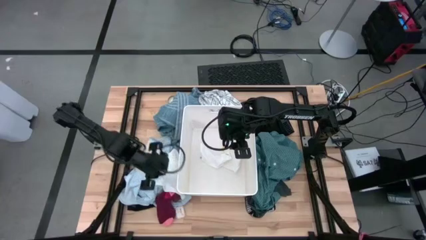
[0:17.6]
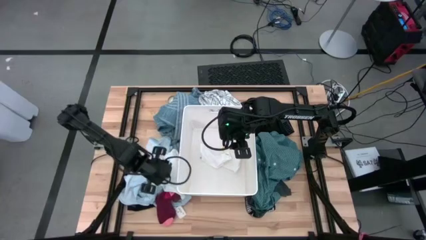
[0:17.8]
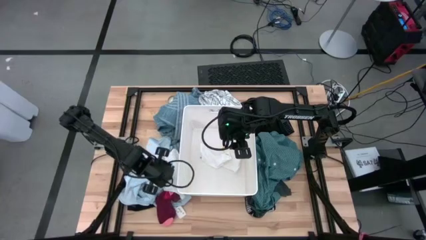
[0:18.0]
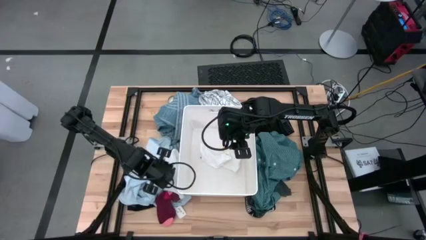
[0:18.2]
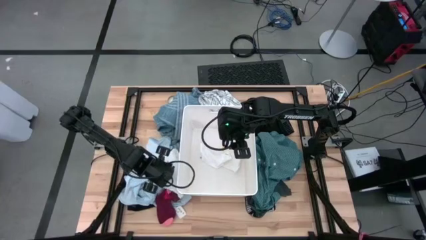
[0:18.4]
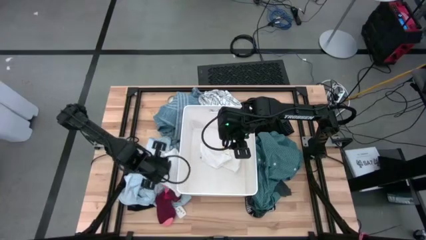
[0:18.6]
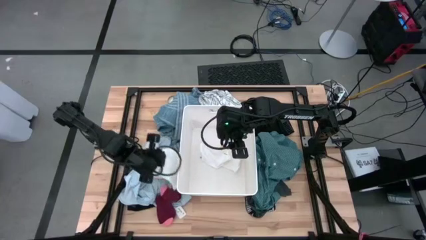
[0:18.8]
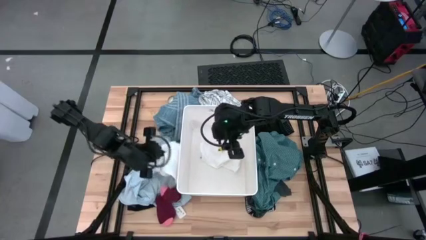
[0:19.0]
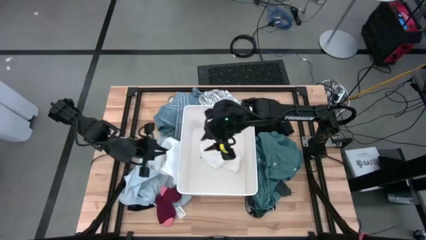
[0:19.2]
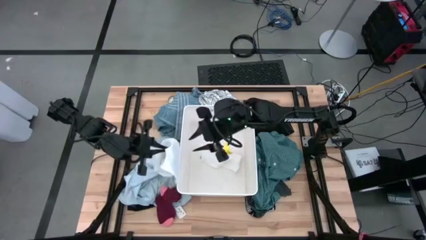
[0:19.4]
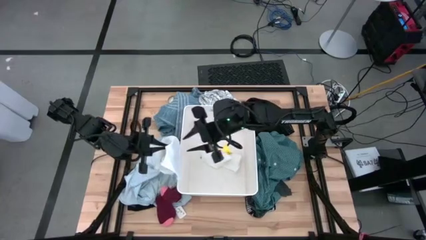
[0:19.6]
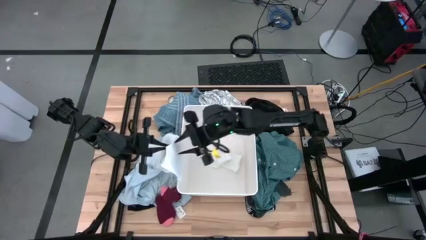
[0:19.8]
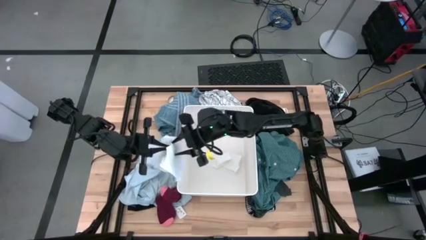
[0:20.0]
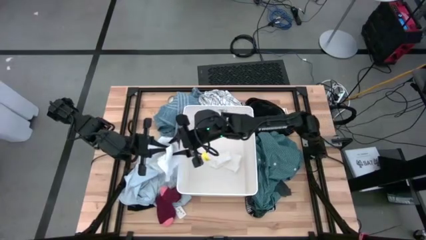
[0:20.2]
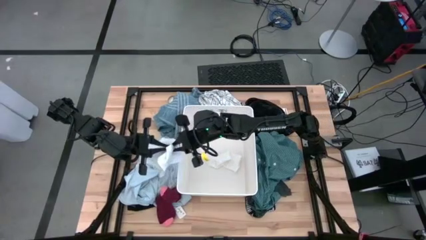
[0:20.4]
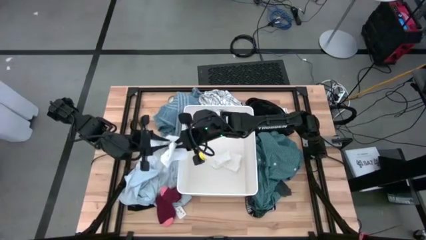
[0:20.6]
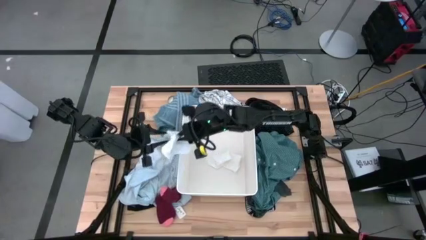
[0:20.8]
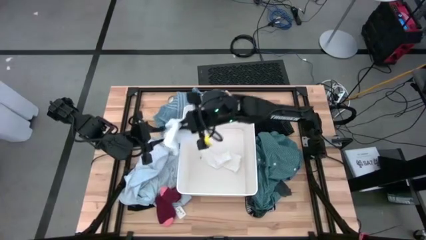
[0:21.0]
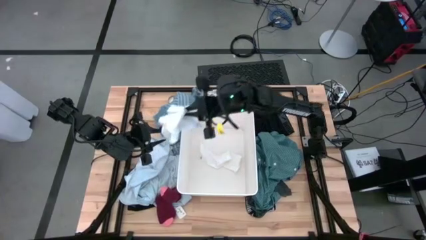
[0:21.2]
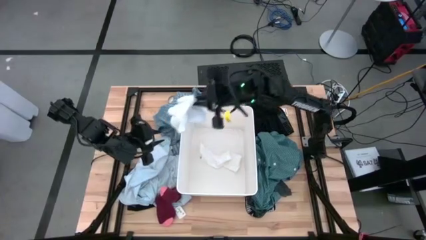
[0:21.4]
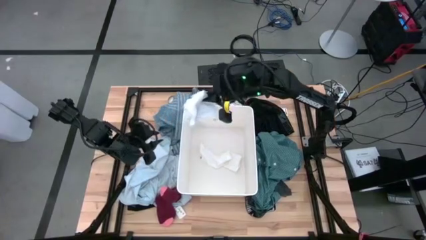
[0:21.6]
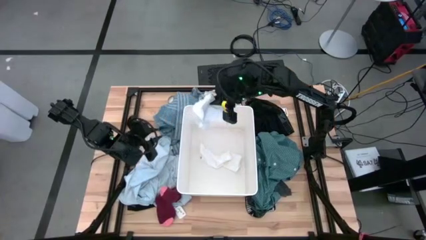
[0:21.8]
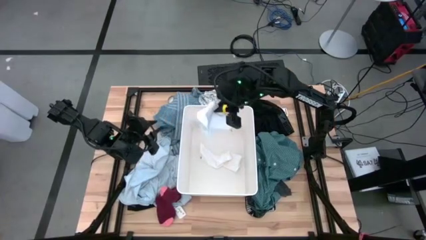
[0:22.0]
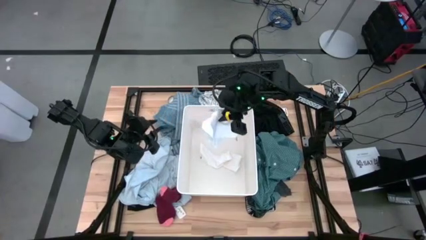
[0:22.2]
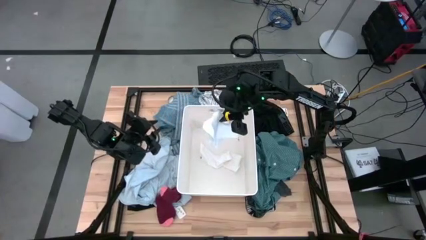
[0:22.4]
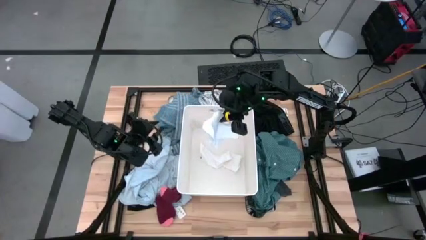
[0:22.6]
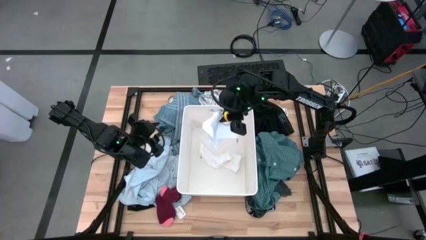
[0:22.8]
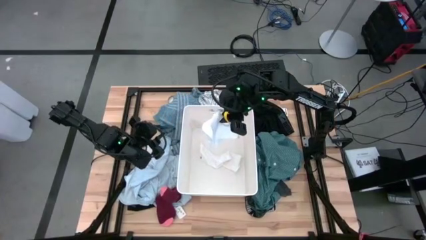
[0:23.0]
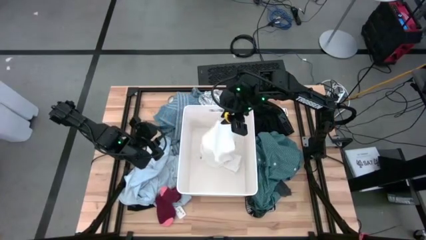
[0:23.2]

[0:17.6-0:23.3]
Task: Sort clothes
Put the white underwear into the white bin

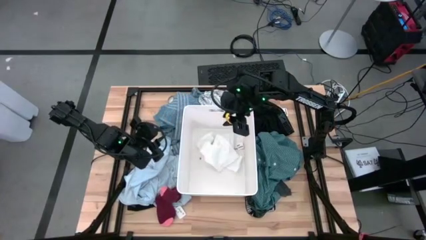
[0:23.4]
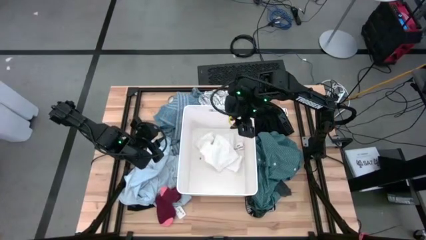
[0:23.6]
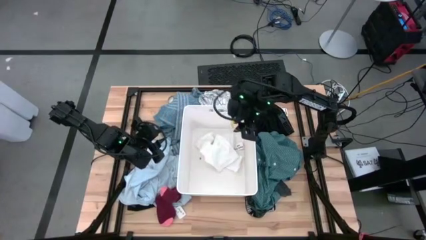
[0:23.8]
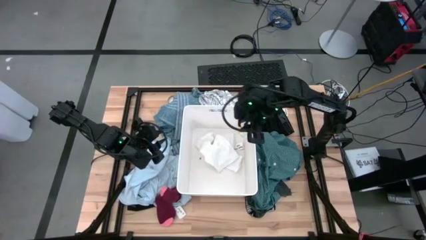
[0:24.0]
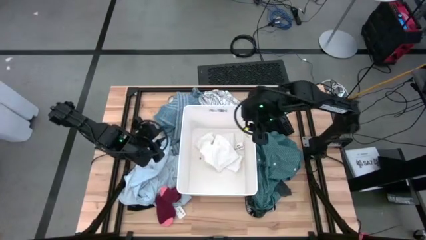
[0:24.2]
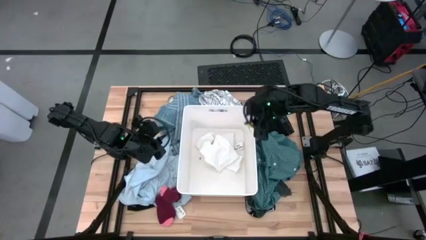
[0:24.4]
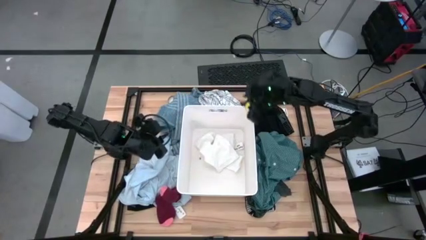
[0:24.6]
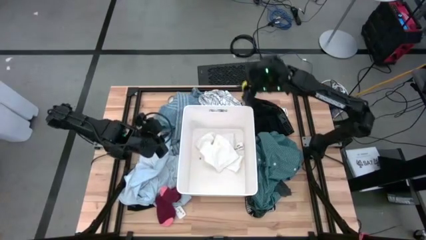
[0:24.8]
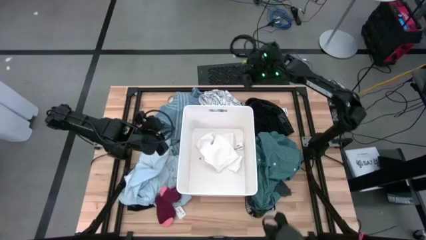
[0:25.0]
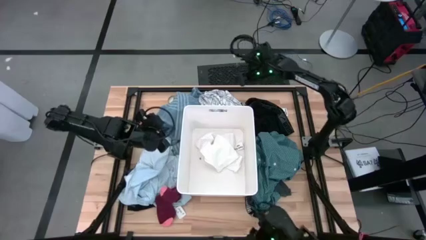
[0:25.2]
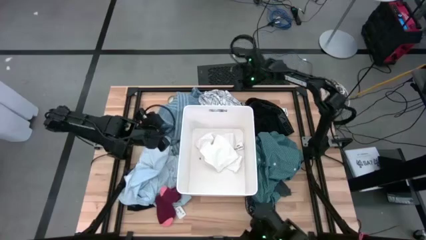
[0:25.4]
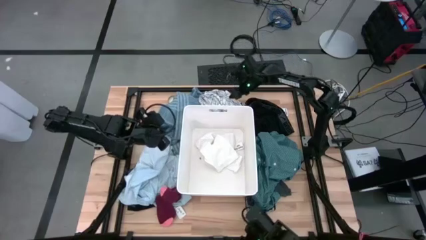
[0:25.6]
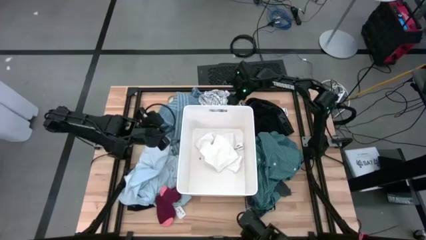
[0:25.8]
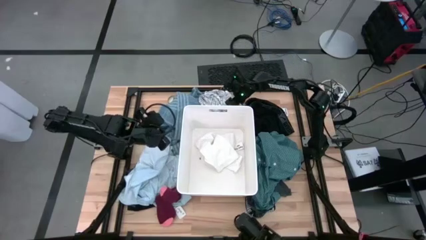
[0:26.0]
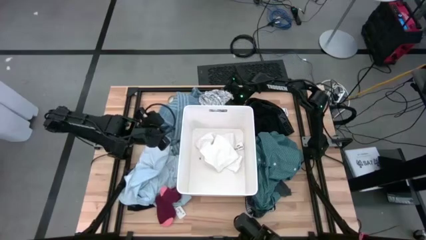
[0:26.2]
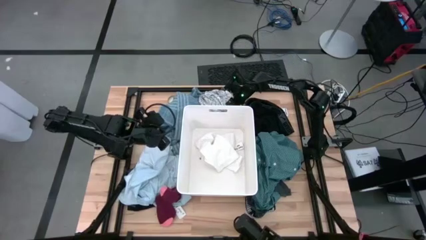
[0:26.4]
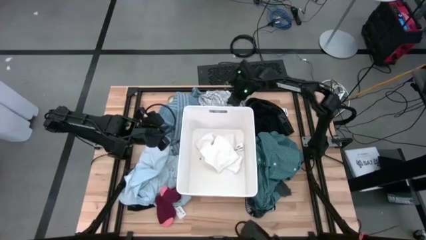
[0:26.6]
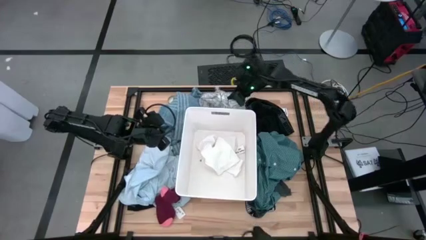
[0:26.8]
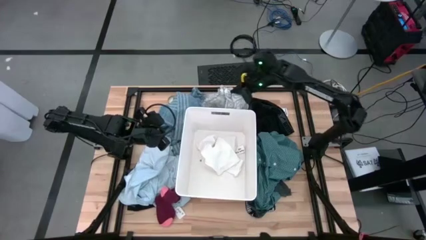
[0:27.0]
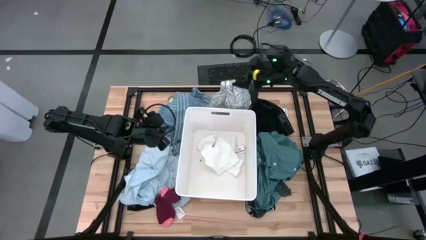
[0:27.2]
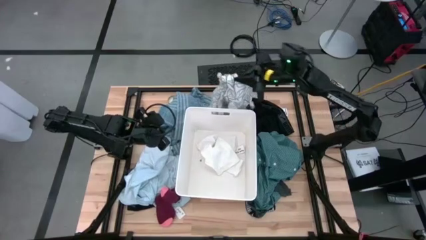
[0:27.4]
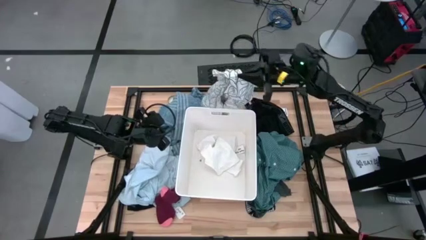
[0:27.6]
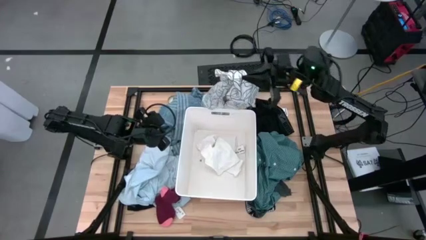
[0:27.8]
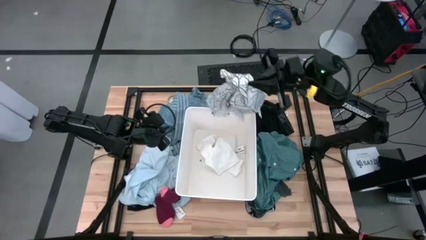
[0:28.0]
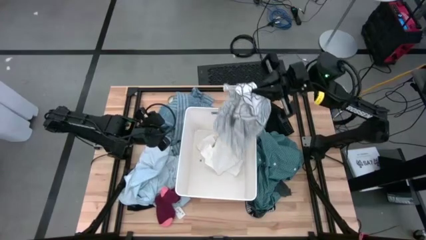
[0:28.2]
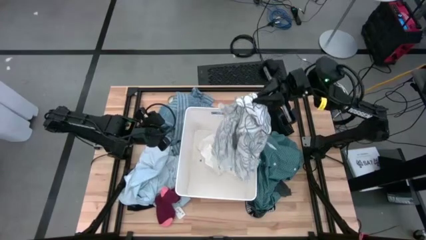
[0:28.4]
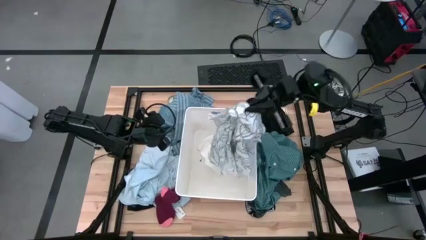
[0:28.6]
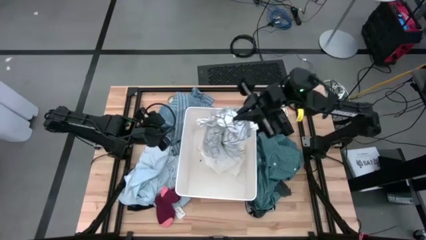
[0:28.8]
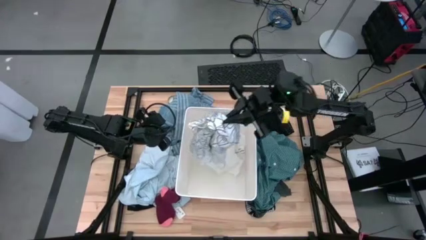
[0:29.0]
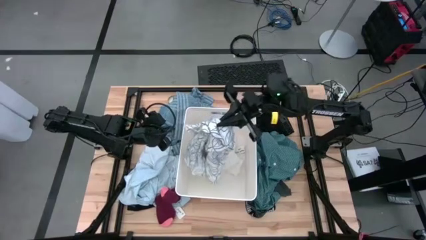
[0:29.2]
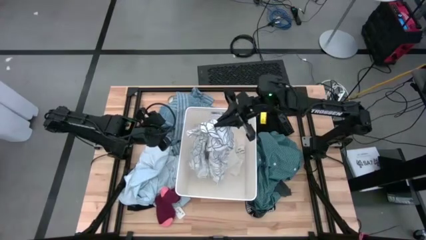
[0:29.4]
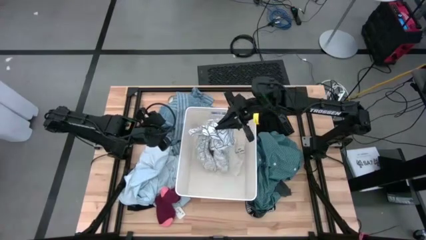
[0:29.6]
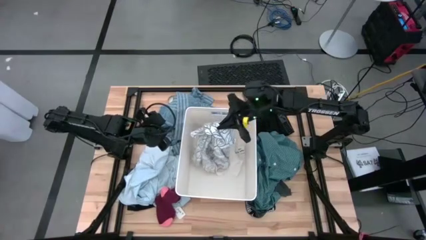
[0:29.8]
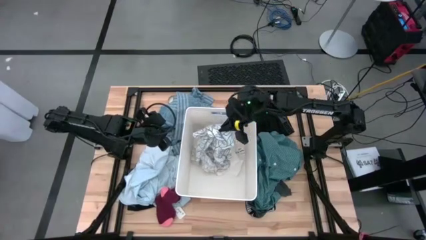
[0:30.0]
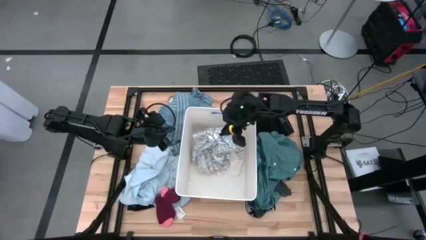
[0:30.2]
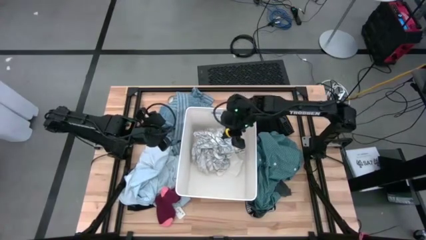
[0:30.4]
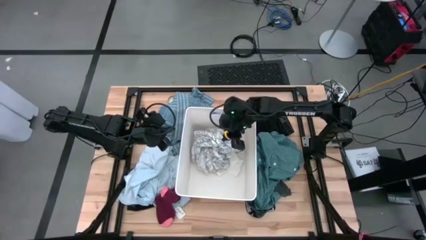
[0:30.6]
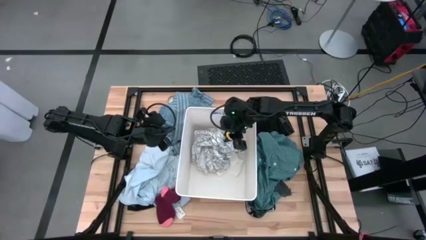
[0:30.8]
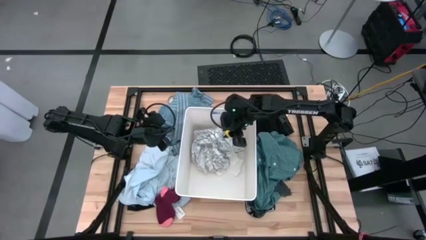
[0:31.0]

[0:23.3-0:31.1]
Put the white patterned shirt into the white bin

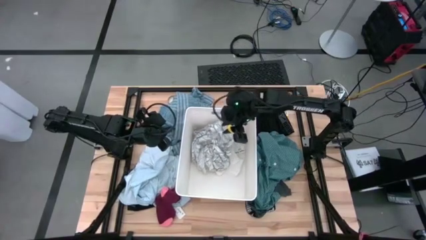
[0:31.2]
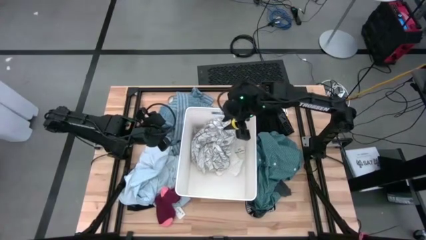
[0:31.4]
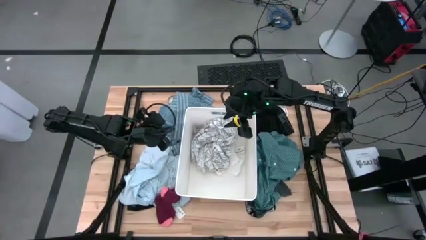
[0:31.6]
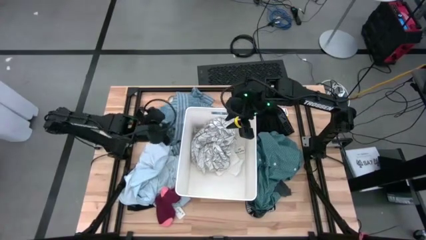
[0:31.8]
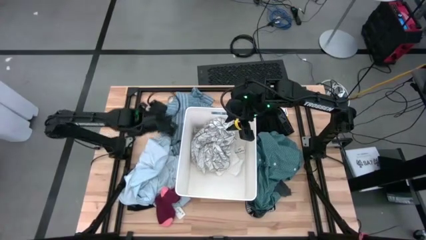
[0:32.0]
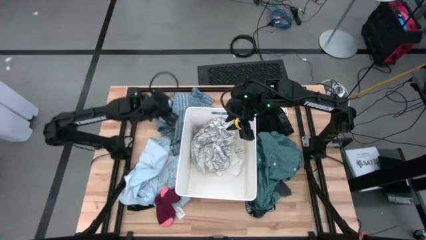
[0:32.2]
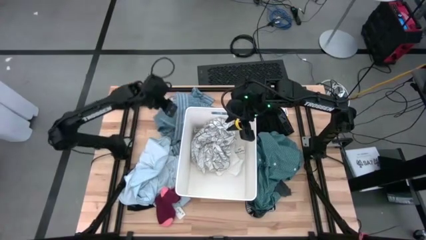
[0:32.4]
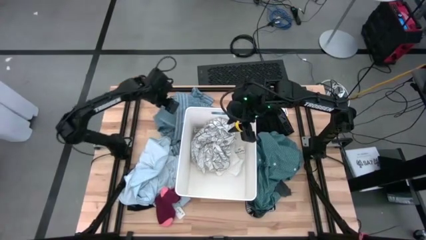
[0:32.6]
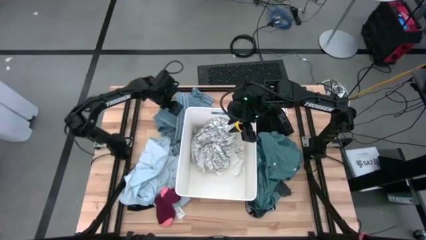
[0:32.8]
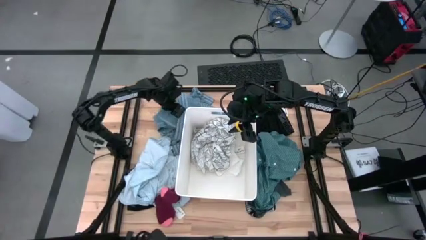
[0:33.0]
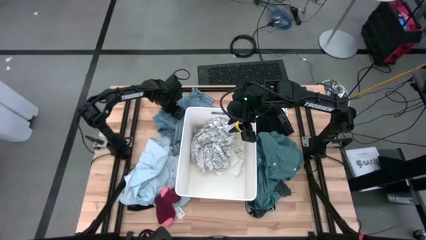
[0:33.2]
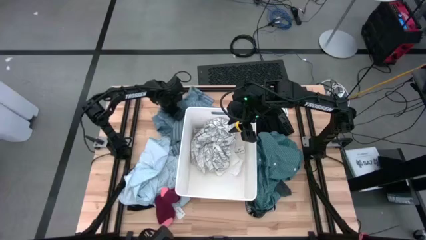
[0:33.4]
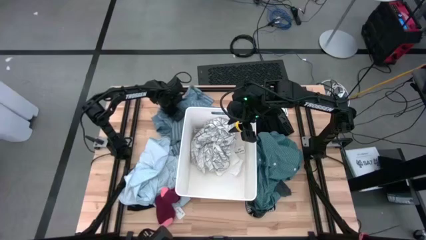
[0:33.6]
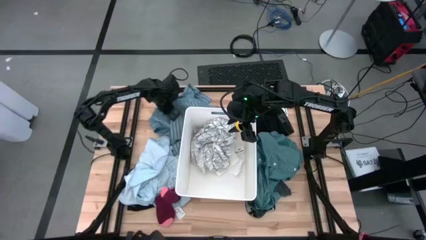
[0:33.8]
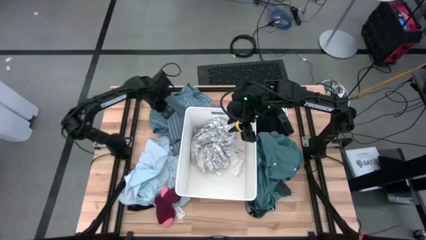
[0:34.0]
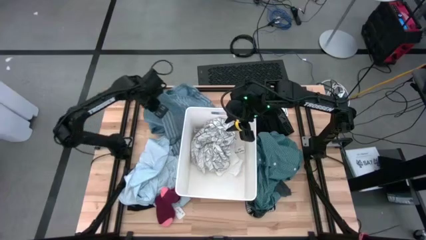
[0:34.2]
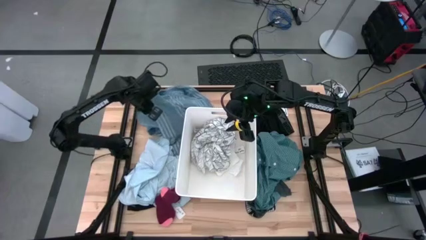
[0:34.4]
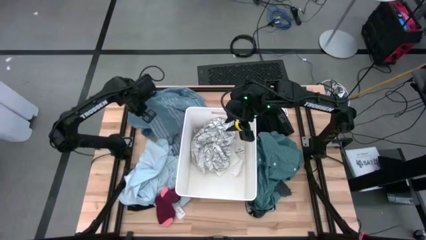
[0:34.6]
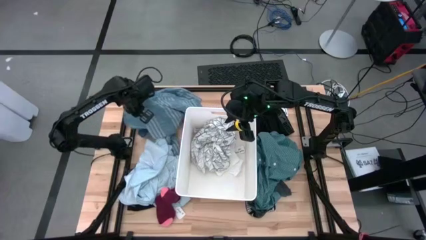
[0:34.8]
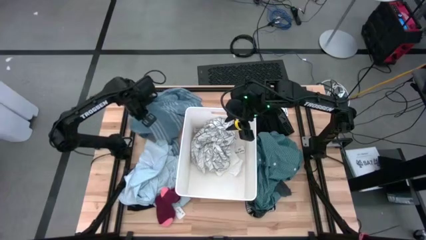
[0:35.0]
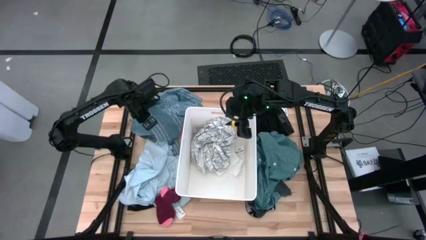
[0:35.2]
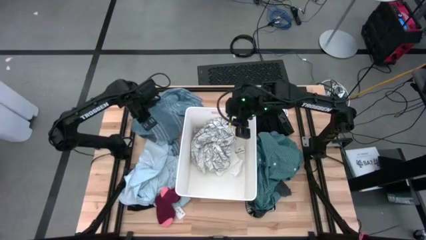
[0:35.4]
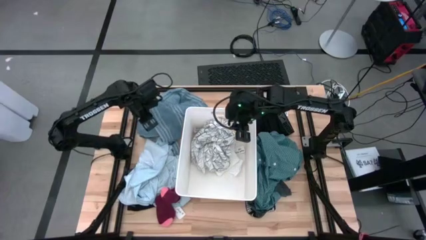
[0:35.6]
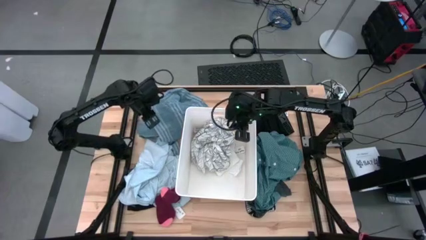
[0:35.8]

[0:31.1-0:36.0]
Put the blue striped shirt into the white bin
